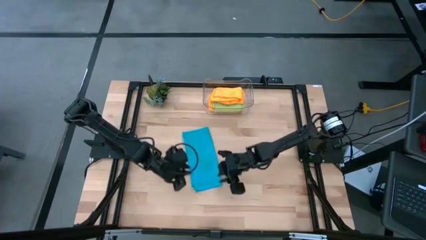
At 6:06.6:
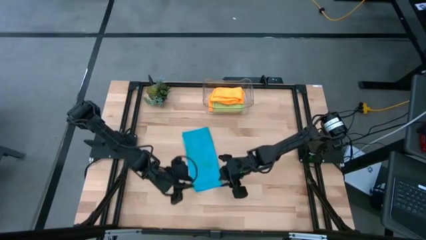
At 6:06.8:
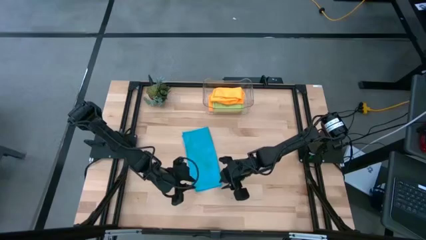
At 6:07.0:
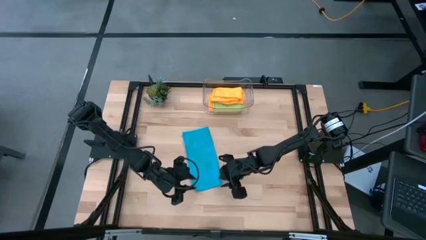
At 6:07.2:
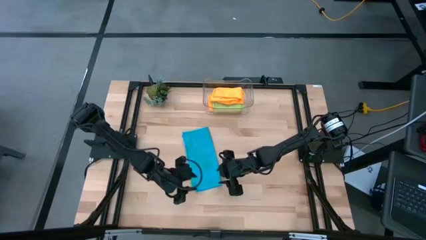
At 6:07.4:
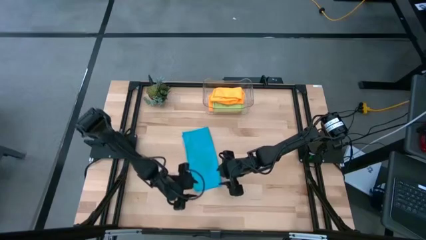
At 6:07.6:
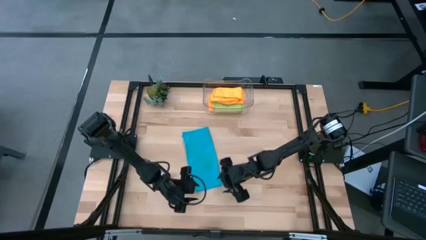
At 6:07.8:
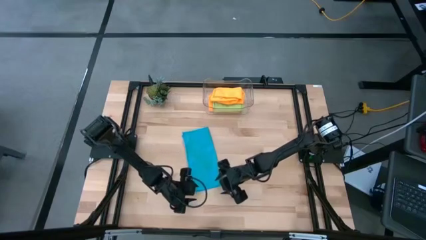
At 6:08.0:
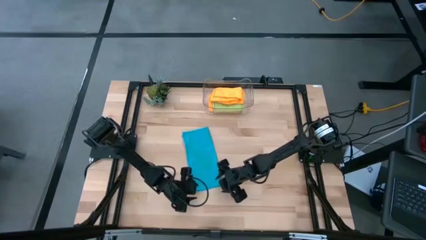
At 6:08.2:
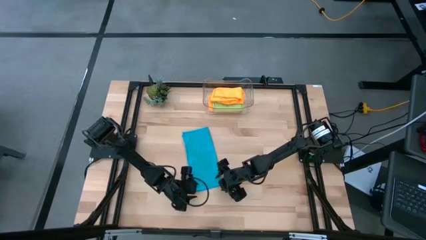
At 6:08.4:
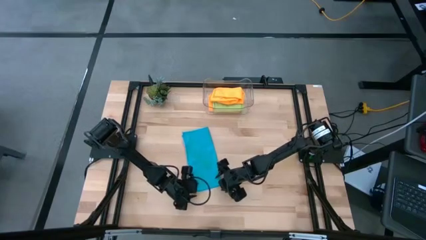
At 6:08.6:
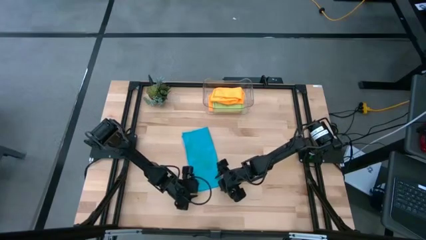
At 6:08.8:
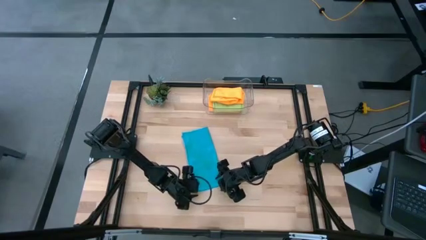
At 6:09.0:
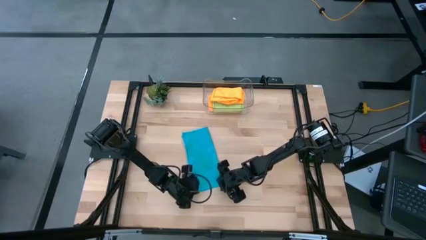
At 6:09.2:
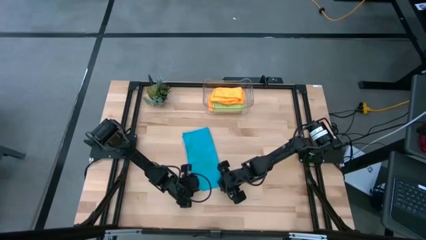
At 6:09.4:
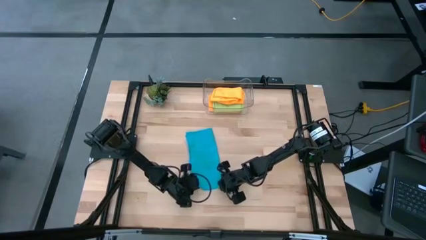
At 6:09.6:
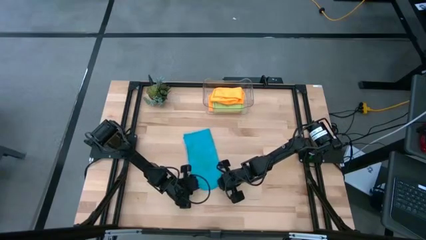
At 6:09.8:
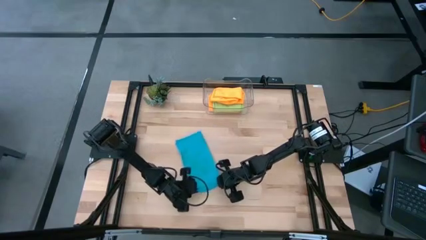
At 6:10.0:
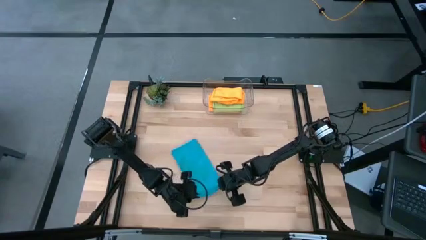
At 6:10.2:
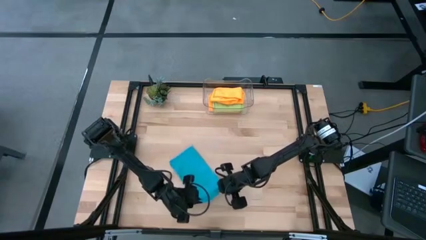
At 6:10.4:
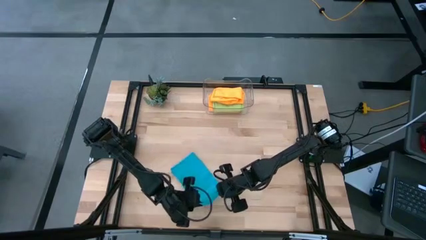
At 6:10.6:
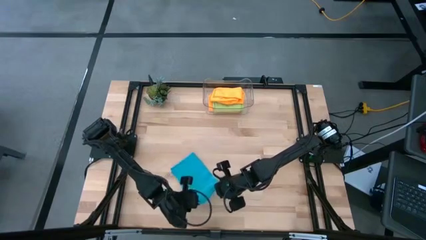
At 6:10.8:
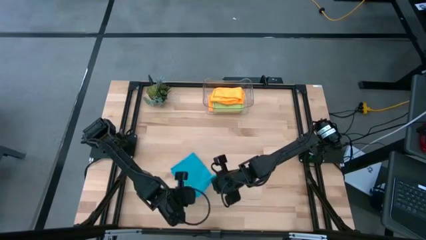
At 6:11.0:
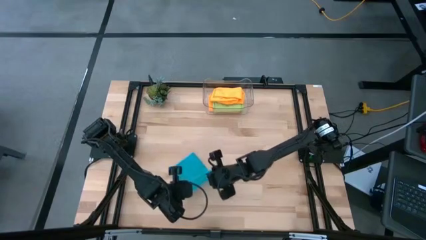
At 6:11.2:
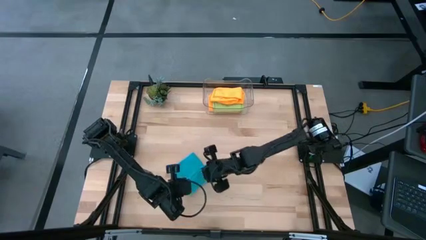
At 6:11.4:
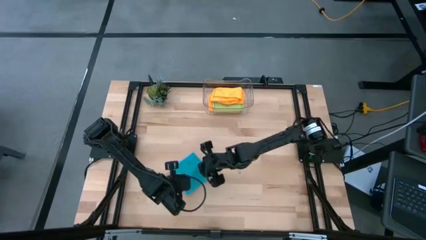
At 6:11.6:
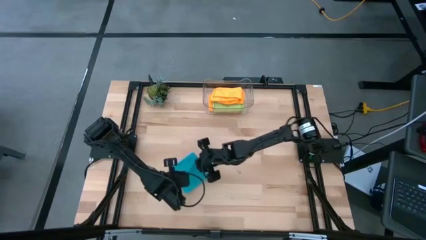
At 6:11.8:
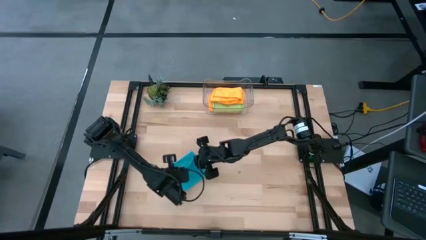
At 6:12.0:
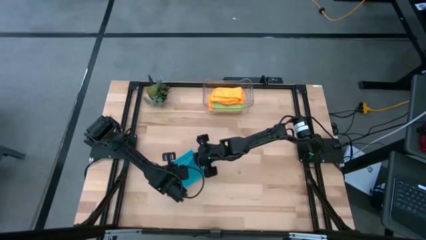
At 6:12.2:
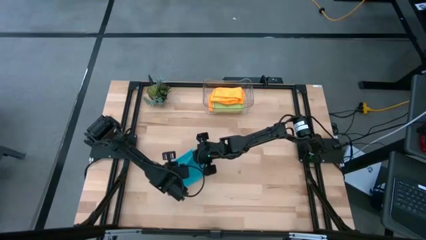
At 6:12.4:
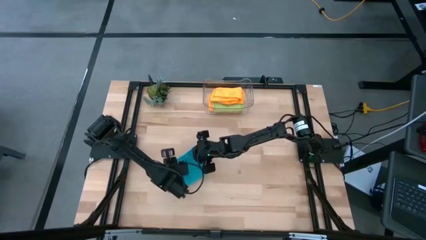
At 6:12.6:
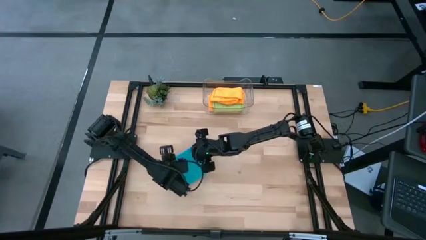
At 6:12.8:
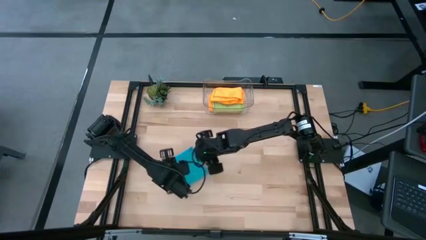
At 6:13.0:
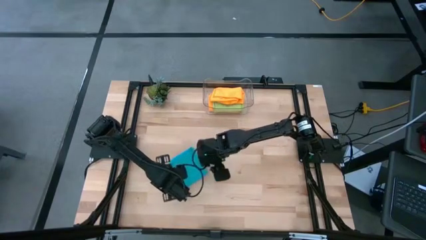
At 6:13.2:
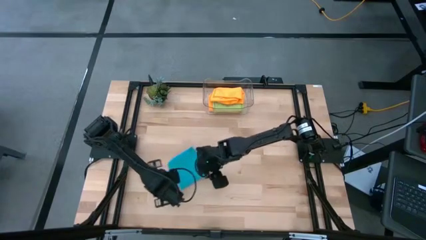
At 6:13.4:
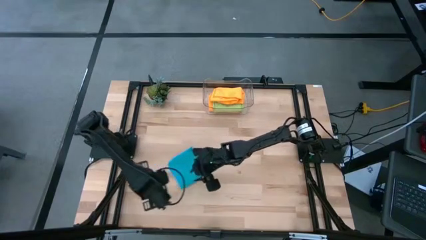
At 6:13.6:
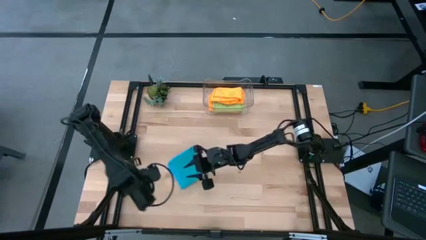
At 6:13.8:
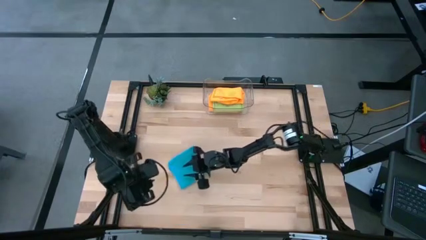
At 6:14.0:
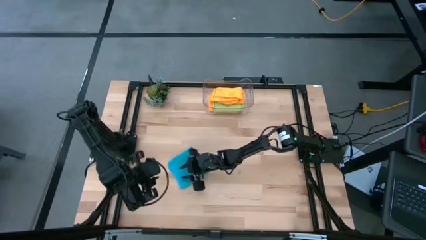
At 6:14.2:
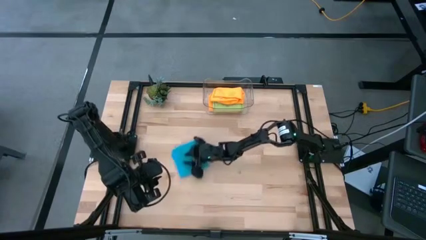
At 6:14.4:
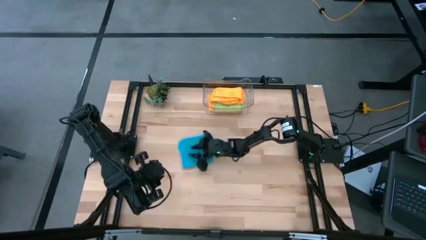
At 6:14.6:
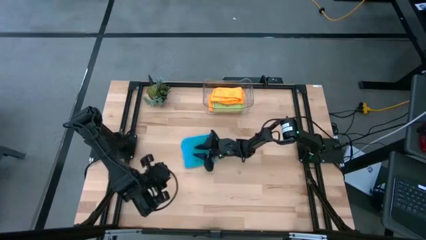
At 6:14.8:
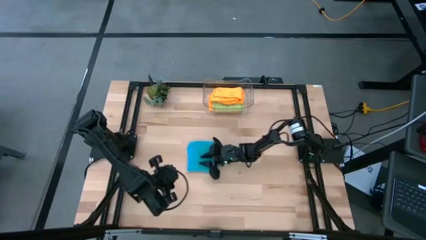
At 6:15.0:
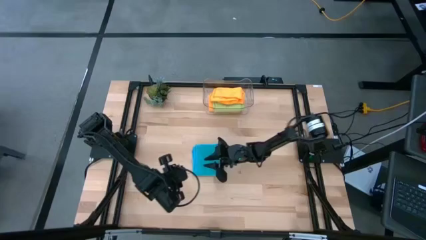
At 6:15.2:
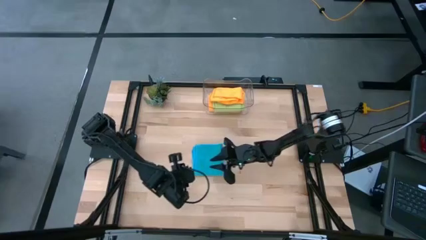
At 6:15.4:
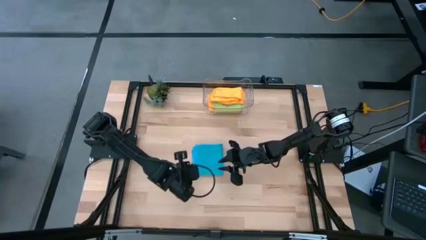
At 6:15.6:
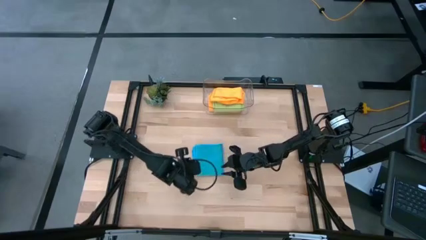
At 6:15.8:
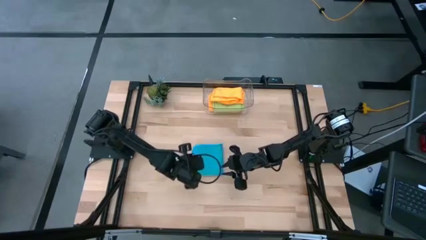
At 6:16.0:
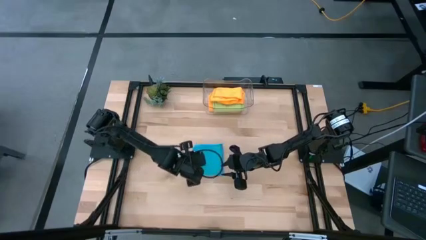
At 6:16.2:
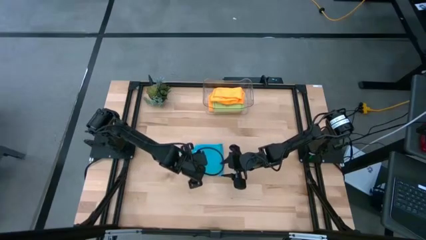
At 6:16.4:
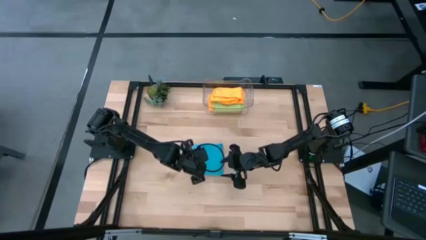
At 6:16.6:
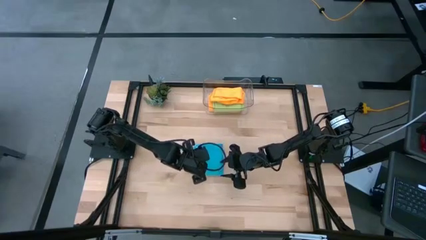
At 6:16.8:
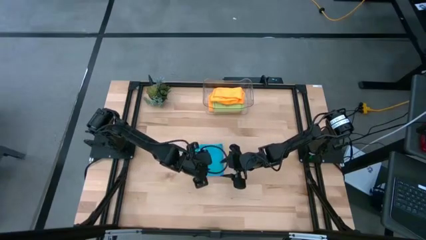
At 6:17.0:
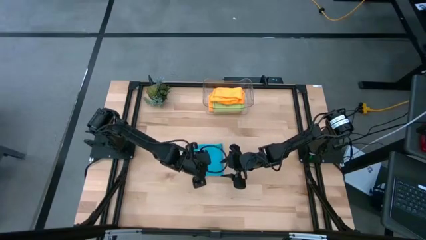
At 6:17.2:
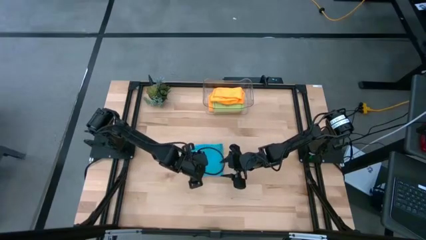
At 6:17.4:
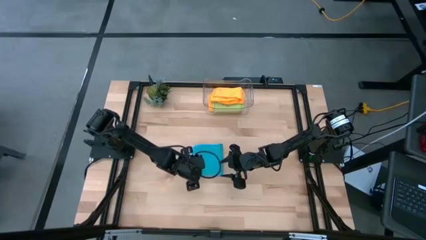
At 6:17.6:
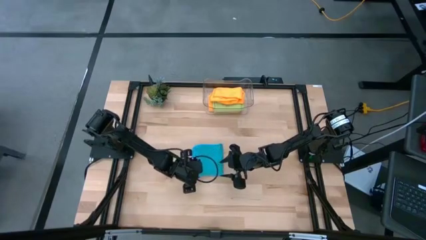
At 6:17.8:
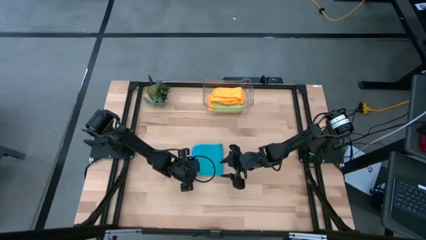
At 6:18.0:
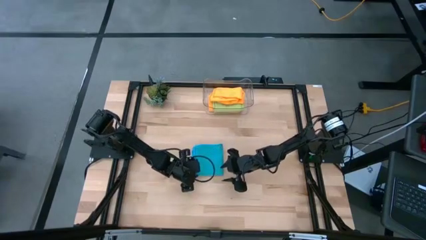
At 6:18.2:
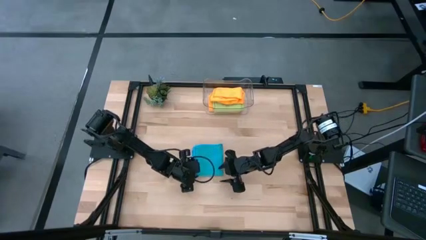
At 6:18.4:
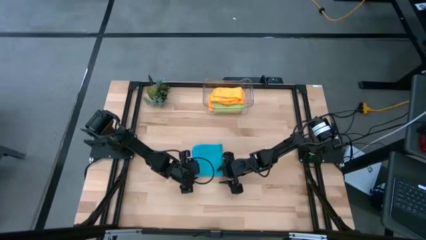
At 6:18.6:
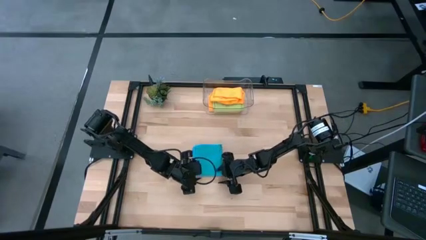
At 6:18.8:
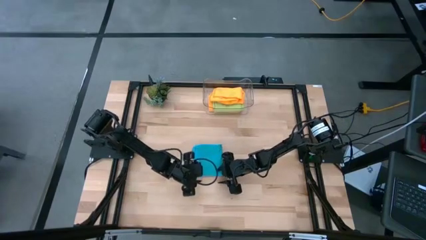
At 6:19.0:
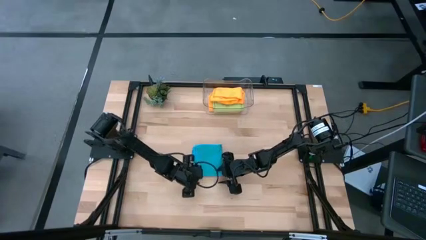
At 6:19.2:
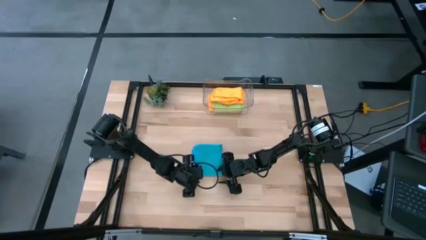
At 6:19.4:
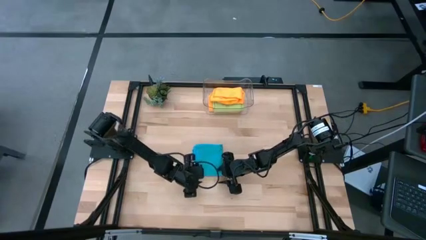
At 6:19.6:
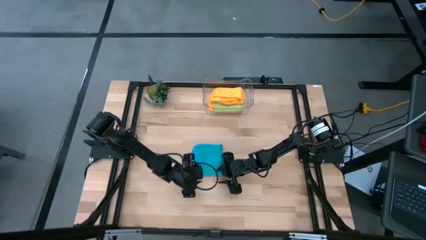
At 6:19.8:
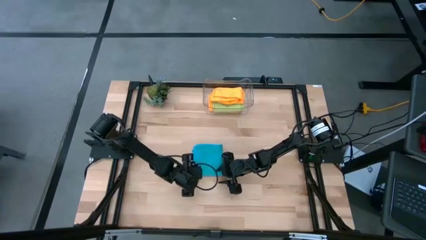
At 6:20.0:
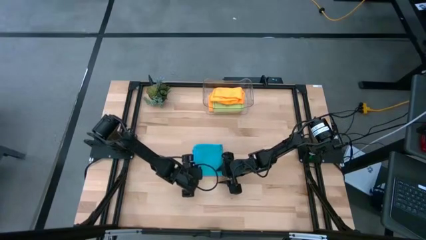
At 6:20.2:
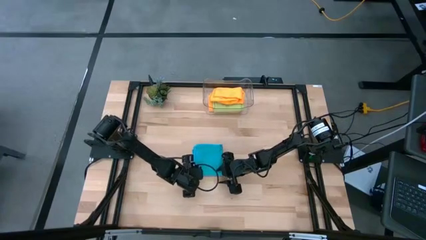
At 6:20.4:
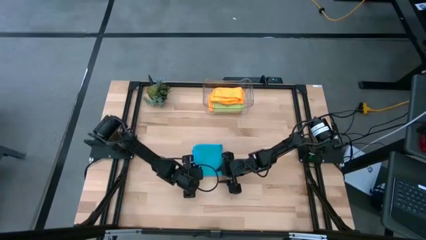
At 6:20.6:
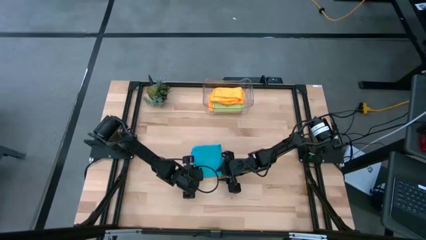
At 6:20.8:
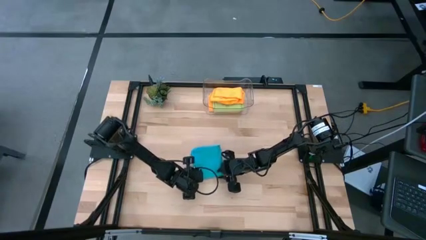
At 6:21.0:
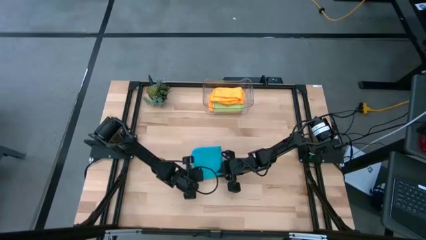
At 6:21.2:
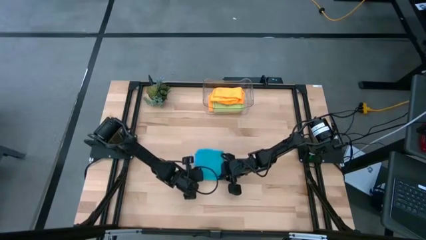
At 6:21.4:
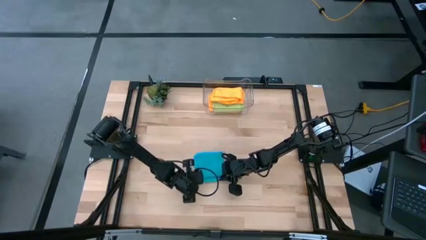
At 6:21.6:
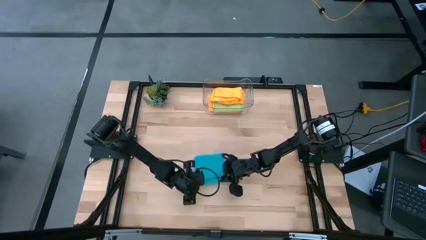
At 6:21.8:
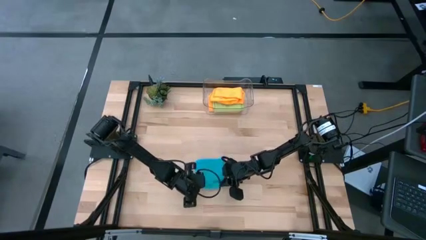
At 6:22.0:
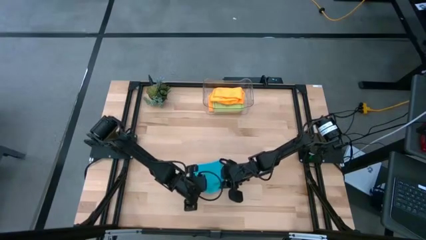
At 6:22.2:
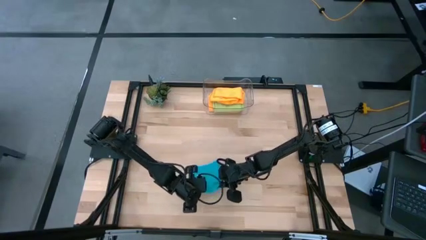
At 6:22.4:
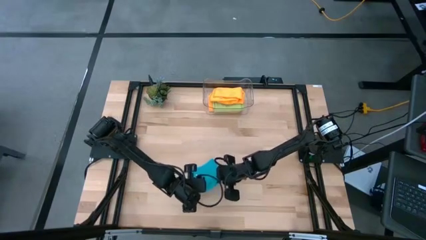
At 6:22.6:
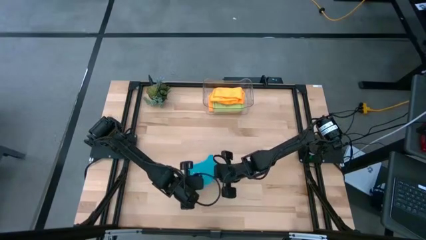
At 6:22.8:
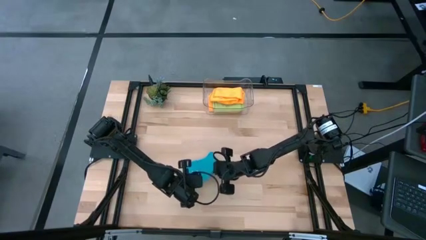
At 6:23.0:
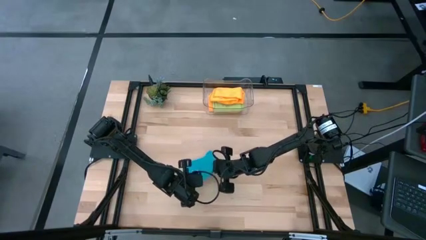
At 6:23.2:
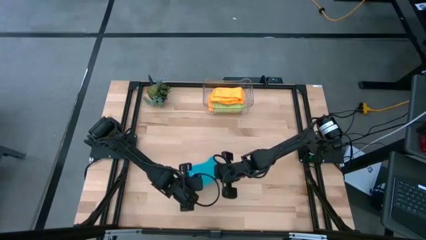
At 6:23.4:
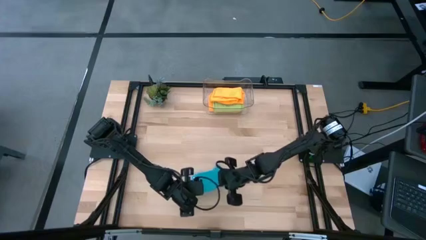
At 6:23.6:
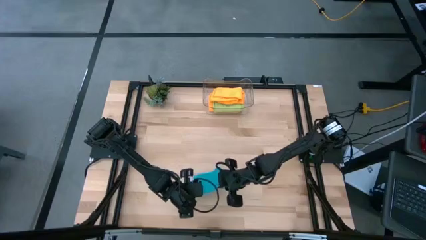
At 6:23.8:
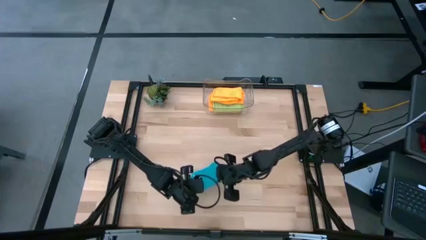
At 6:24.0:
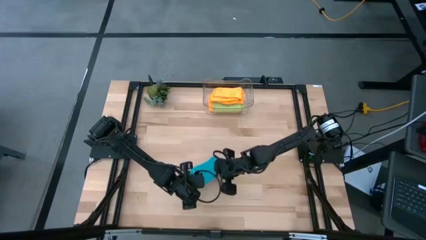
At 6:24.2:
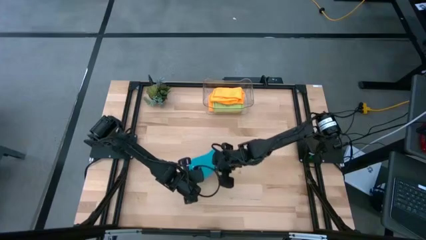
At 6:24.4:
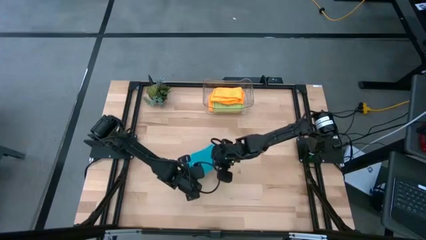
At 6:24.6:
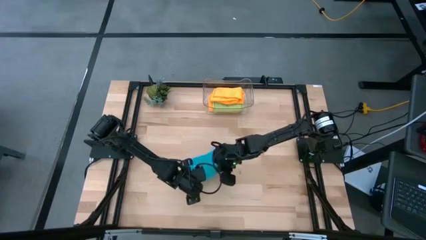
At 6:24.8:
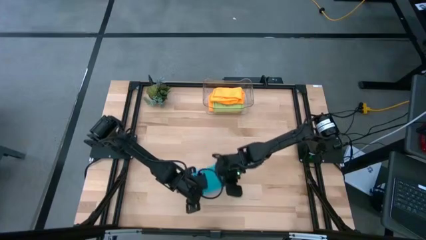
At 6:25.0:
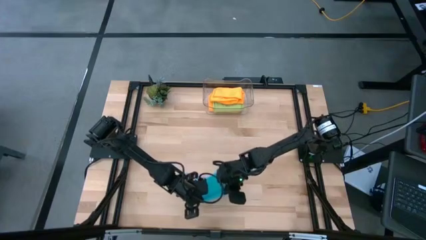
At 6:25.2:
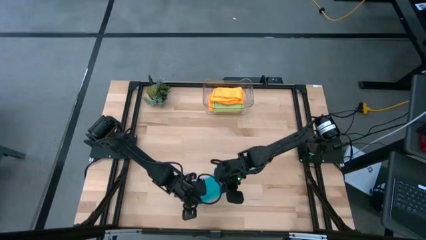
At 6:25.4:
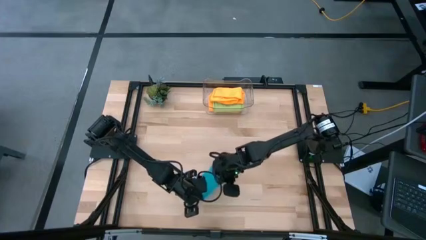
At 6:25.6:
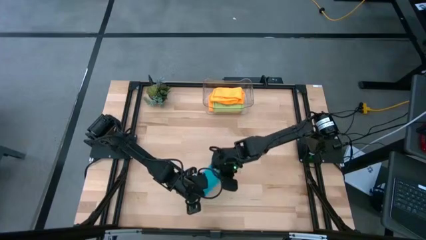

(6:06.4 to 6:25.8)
Task: Fold microfiber towels
Fold the blue microfiber cloth
